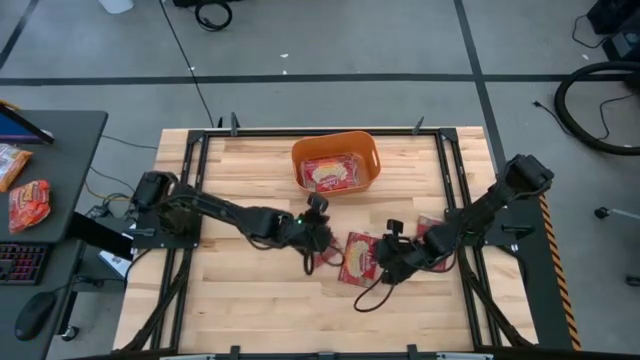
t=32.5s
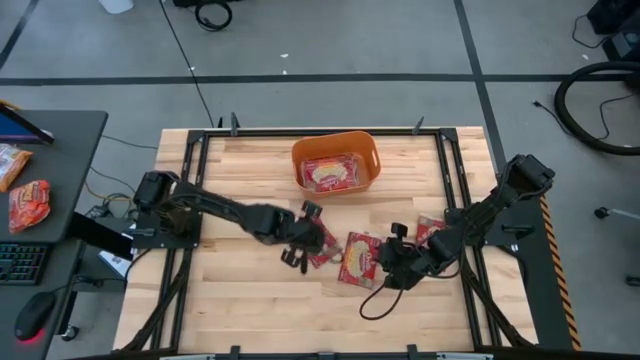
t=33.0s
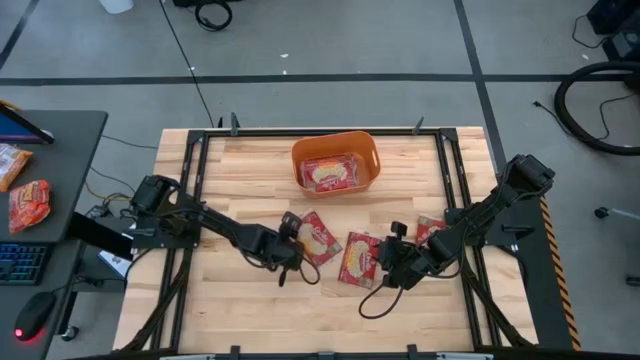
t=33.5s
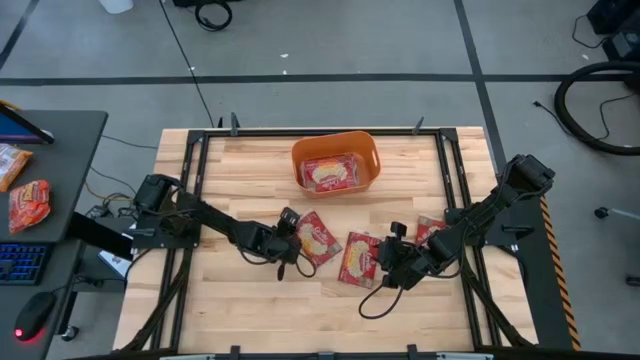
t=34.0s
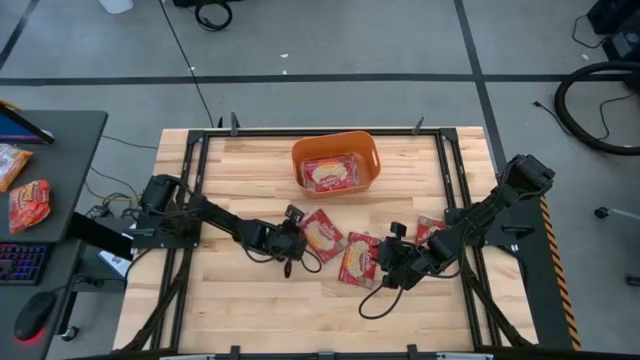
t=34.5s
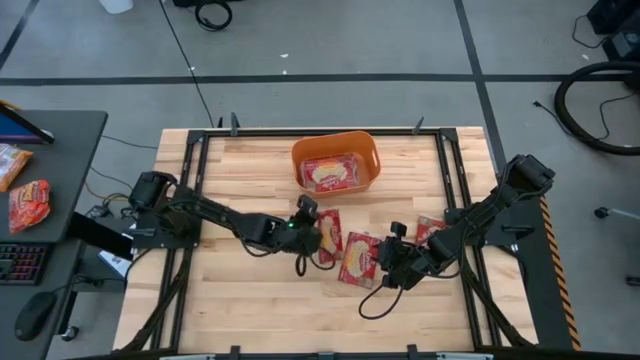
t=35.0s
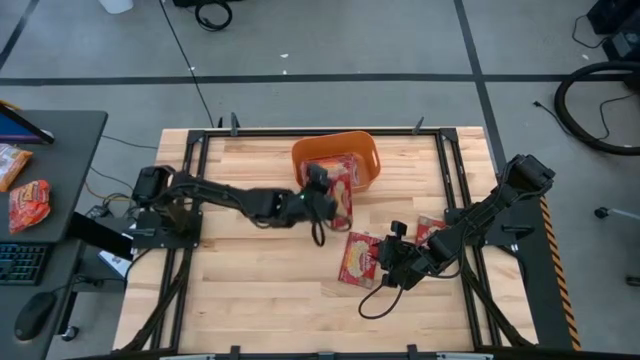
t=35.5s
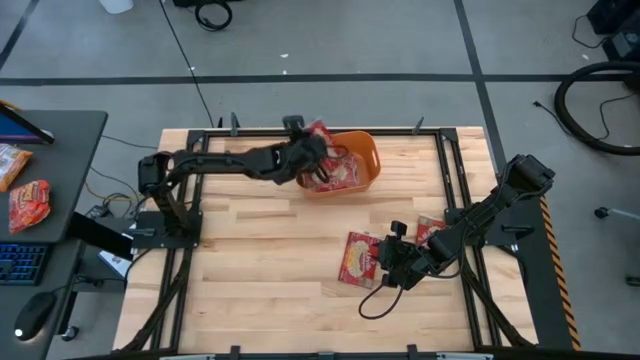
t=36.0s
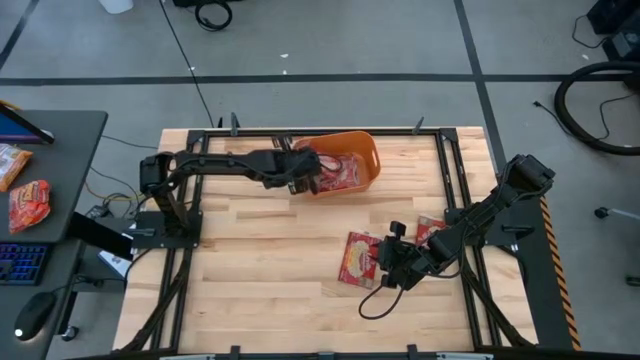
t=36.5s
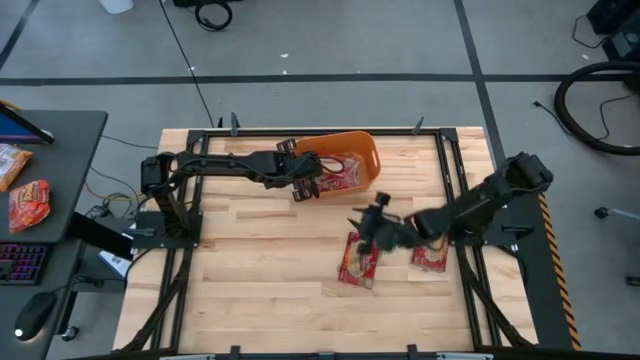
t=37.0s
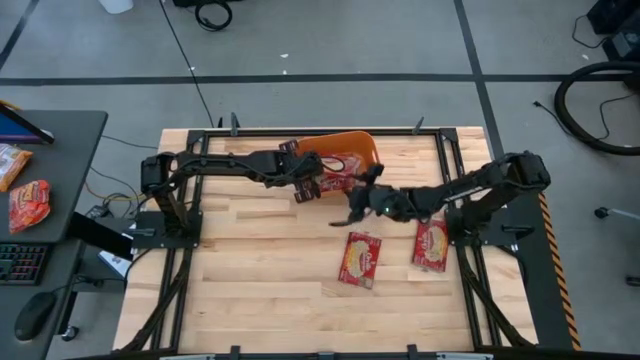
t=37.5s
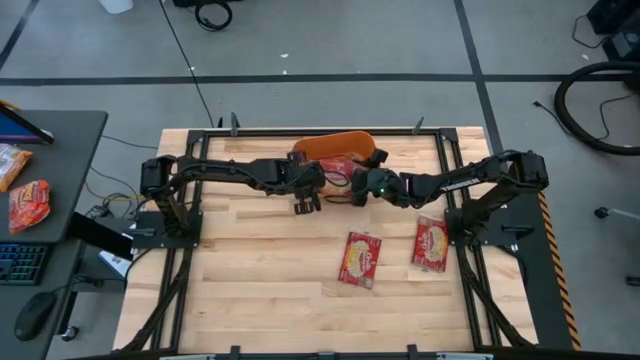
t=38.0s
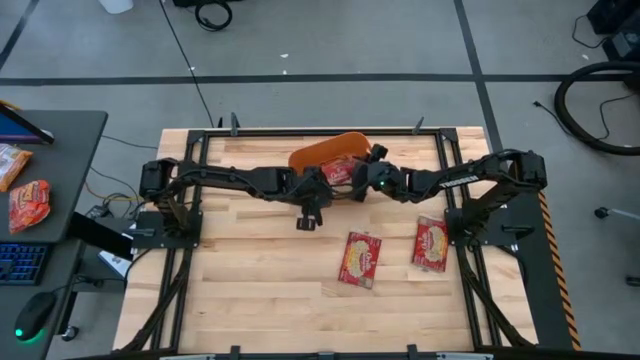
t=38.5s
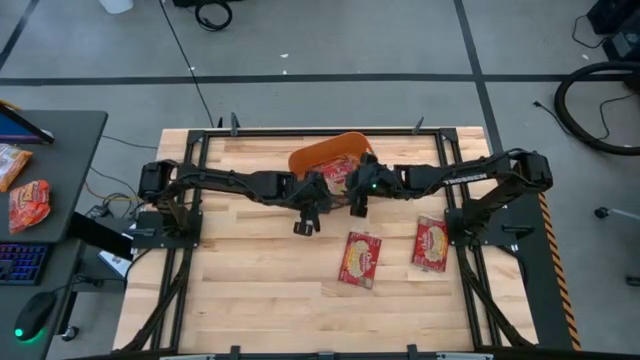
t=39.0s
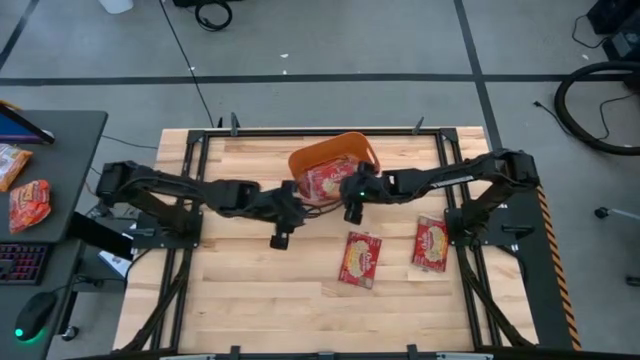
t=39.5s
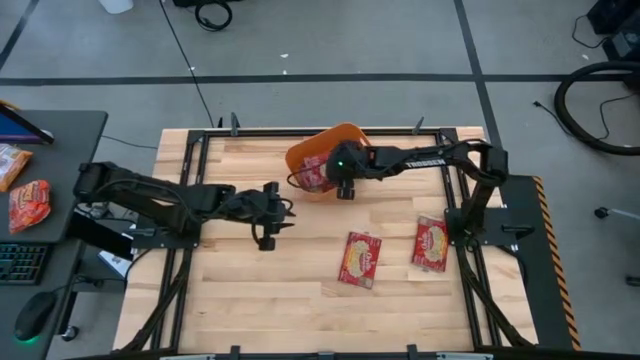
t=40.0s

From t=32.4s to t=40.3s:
Task: Sort popcorn bags into baskets
Put the red popcorn bag into the orange bin

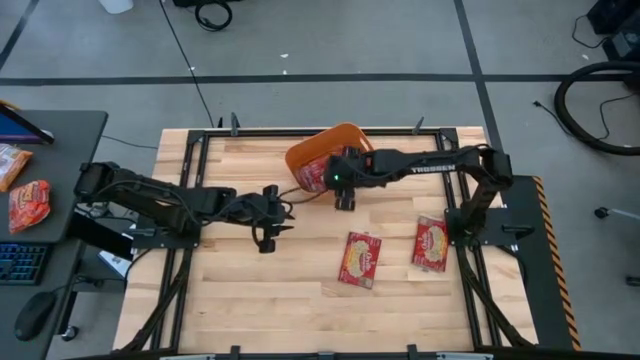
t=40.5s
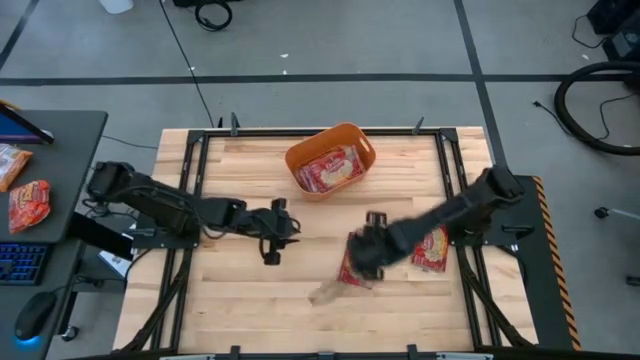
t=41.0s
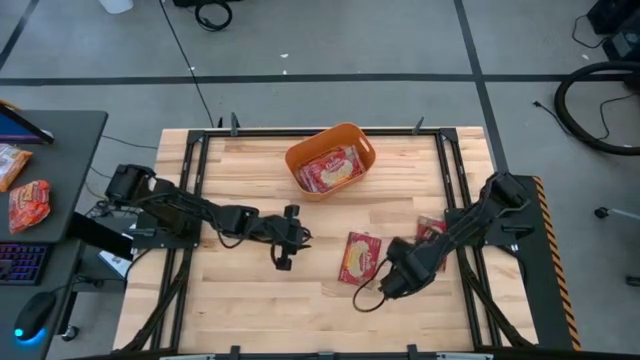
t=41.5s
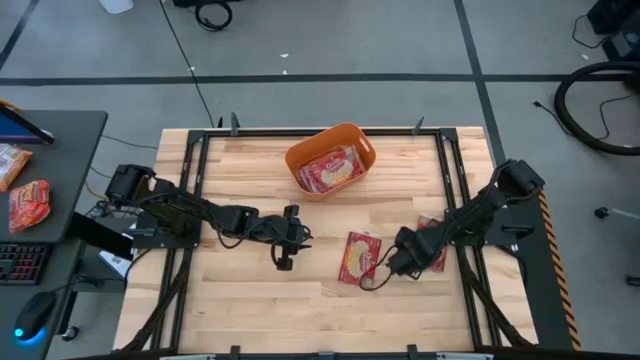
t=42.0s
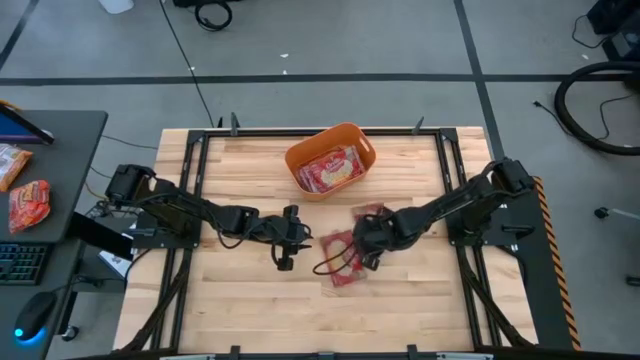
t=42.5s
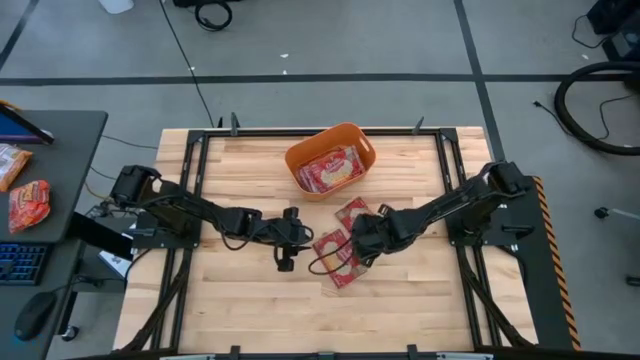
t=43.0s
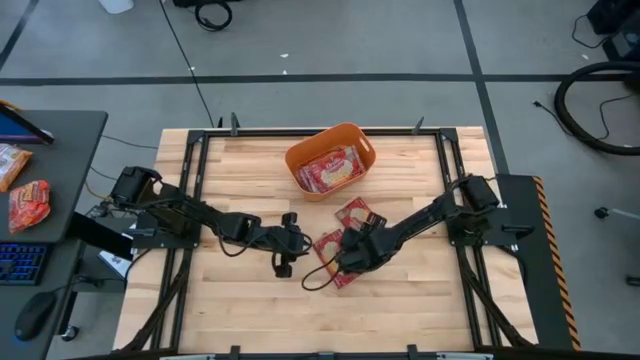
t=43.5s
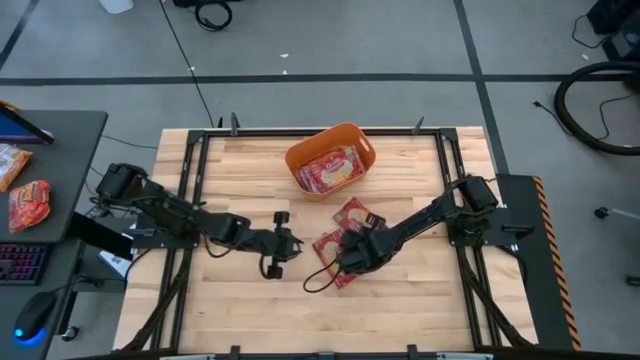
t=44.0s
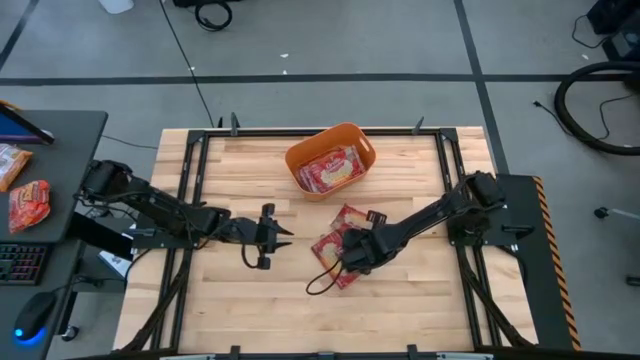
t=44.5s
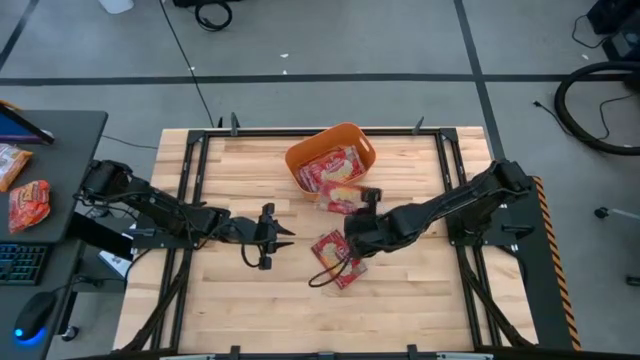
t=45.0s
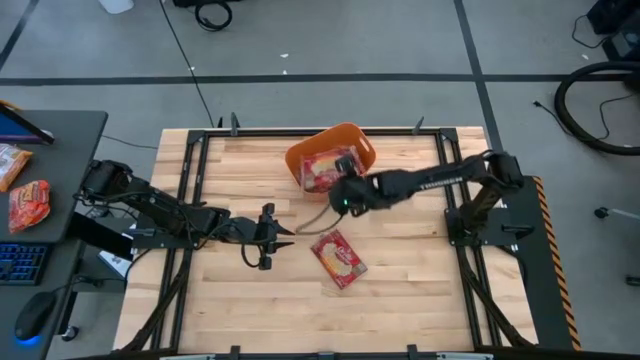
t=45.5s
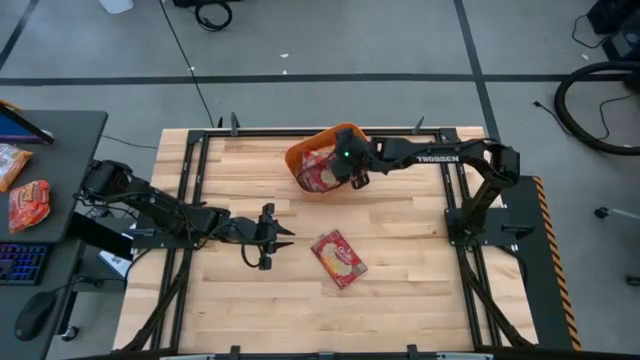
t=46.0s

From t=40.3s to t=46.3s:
Put the red popcorn bag into the orange bin

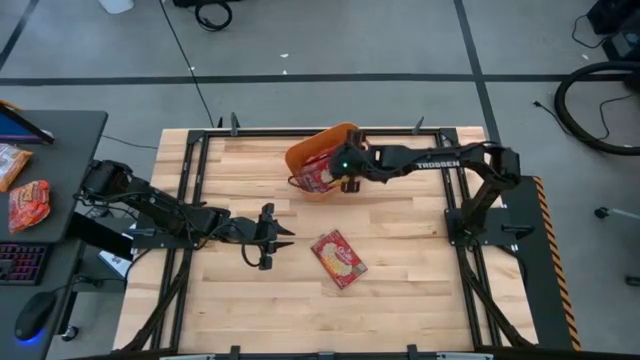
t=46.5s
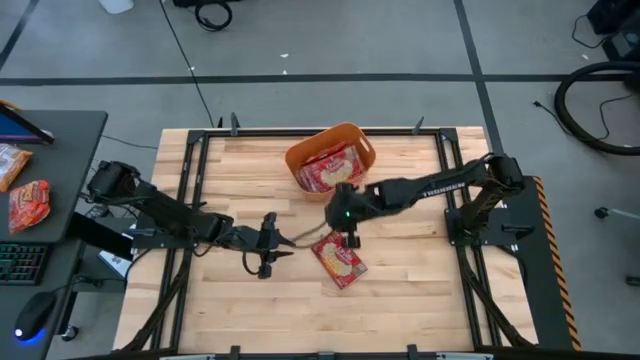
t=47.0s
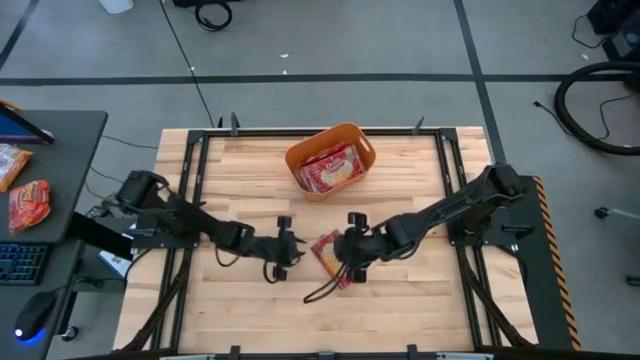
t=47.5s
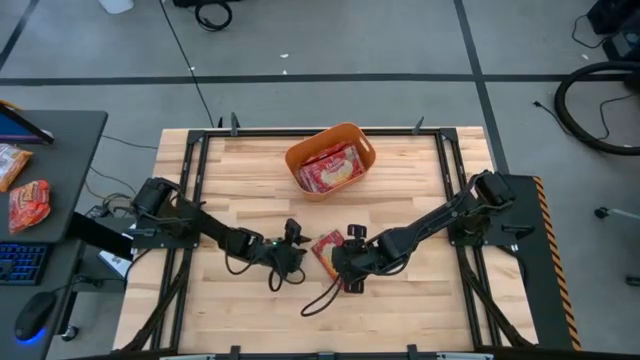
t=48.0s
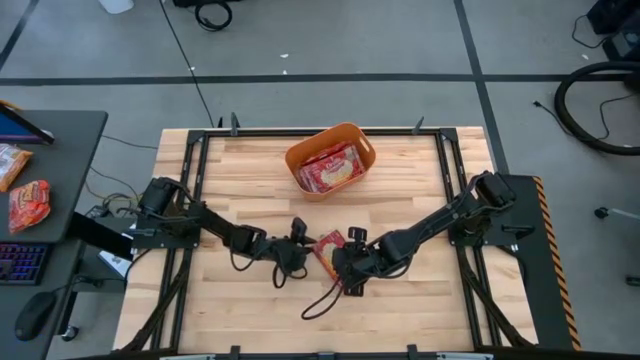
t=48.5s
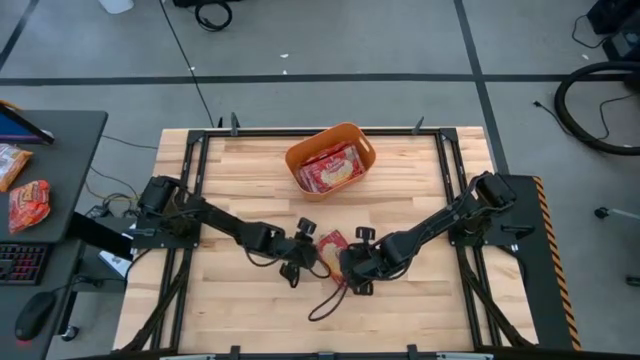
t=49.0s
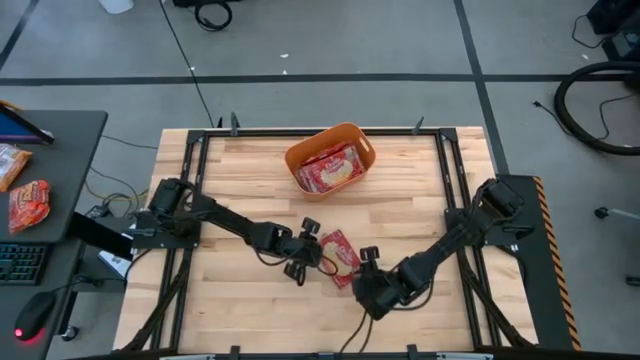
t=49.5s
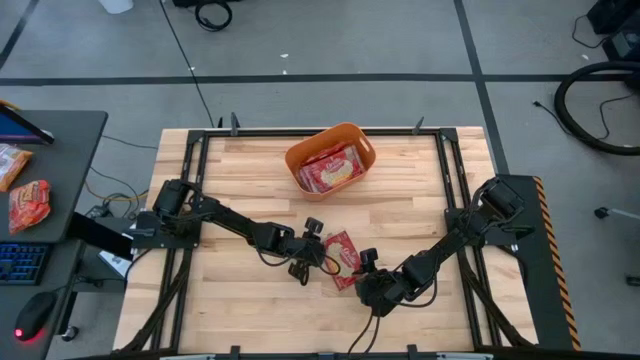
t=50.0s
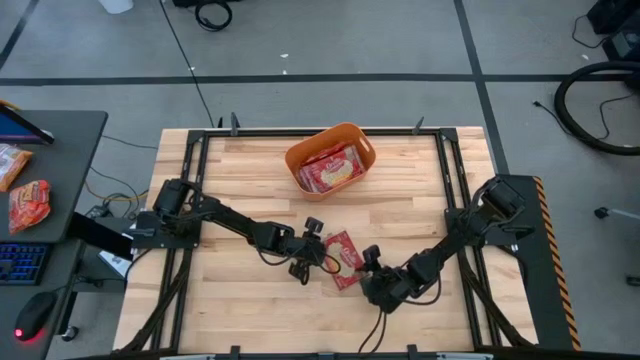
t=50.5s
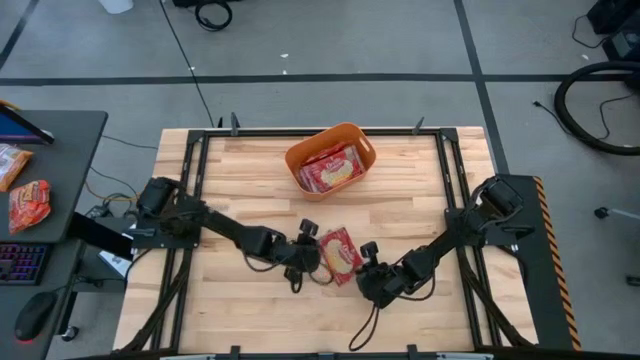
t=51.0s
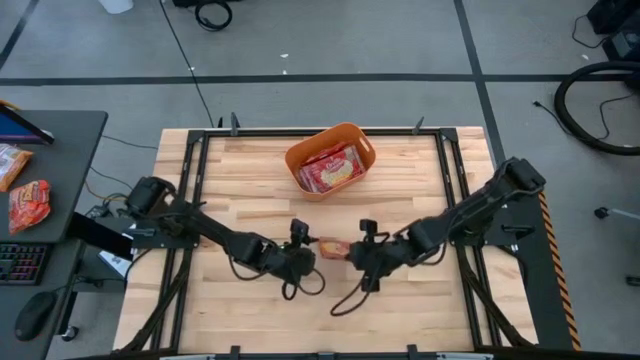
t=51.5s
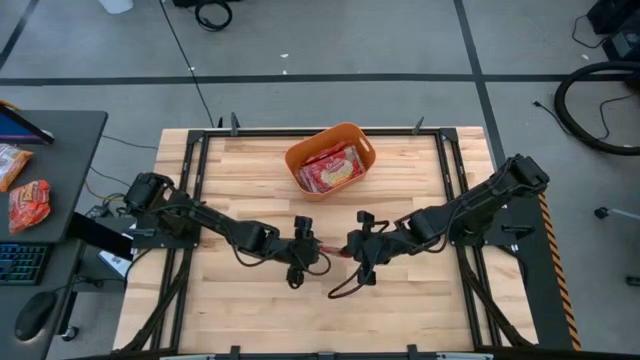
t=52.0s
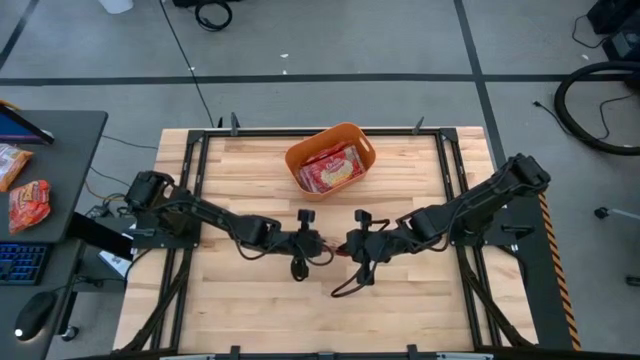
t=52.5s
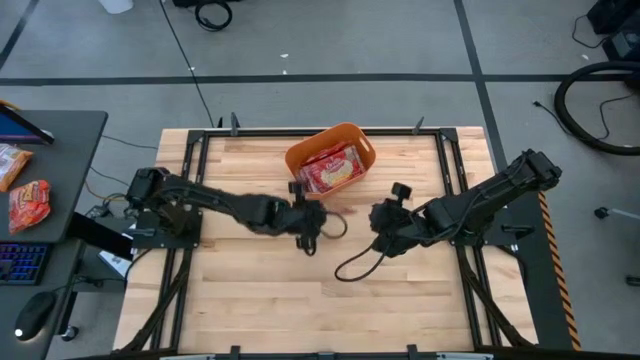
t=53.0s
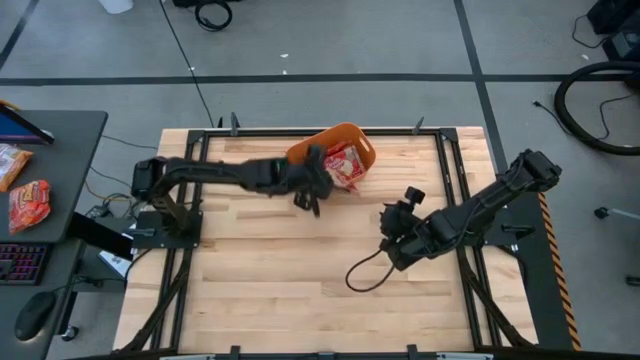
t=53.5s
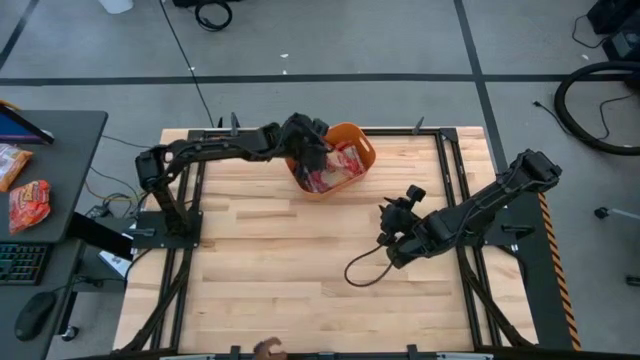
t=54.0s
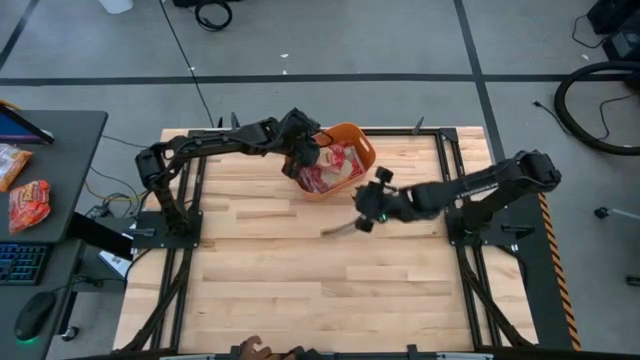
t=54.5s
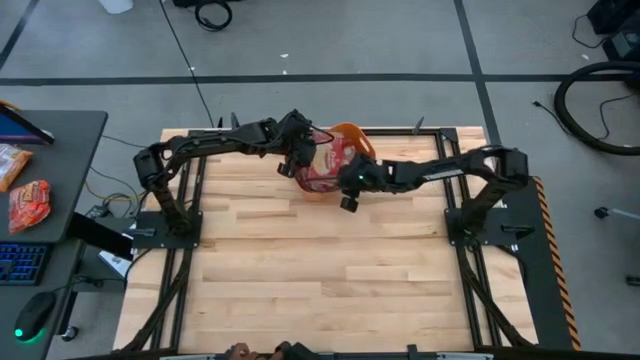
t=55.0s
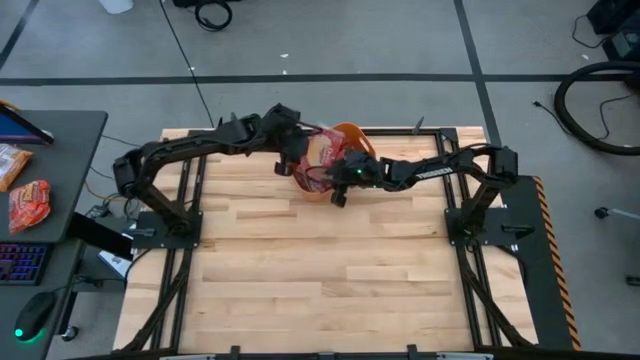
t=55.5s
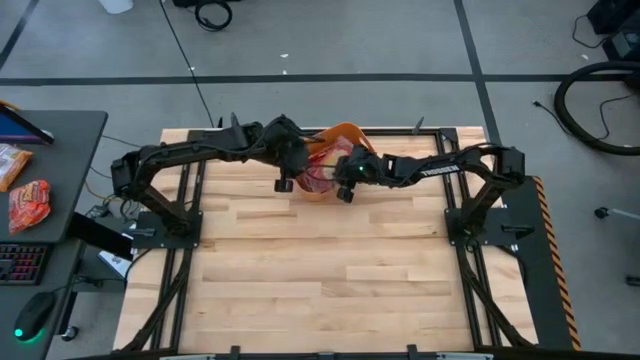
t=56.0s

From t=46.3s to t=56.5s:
Put the red popcorn bag into the orange bin
